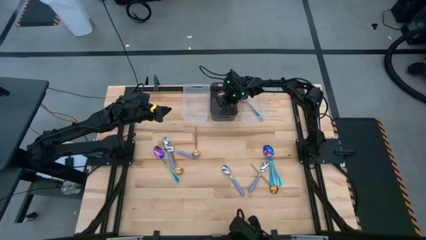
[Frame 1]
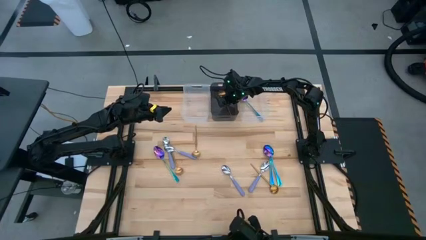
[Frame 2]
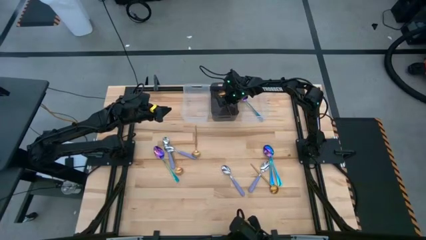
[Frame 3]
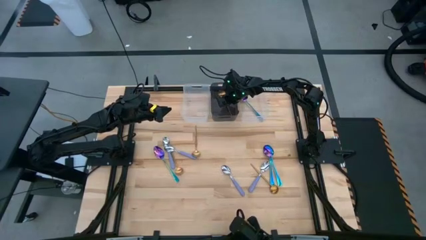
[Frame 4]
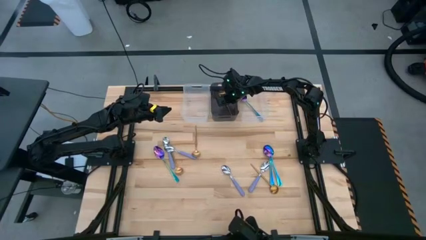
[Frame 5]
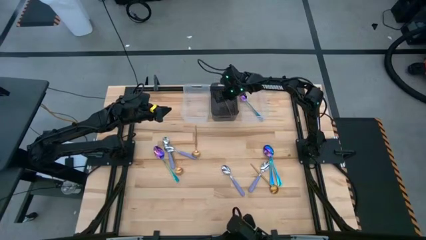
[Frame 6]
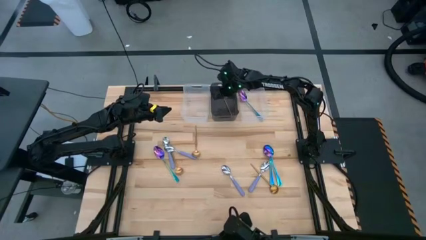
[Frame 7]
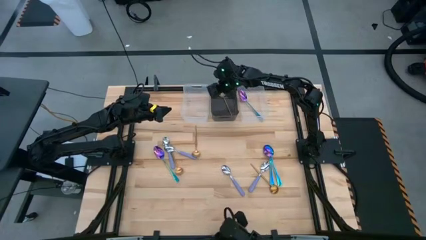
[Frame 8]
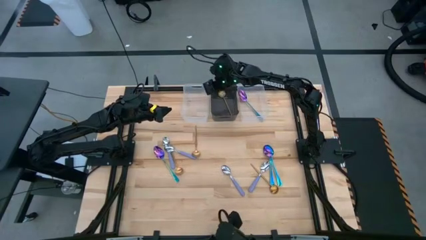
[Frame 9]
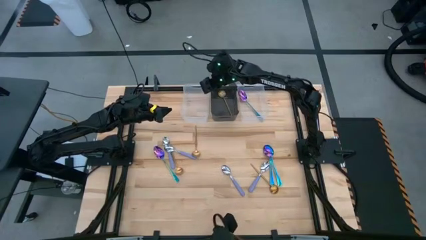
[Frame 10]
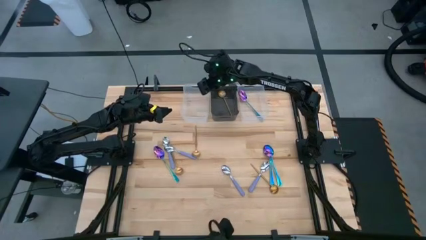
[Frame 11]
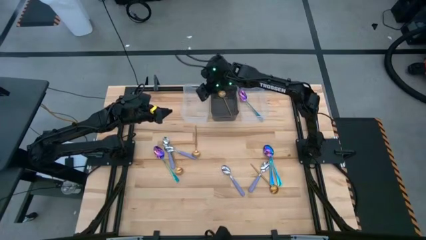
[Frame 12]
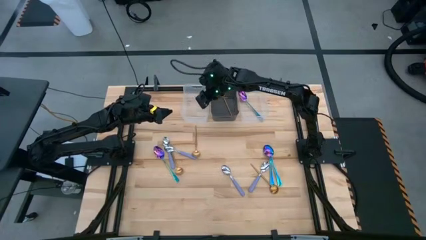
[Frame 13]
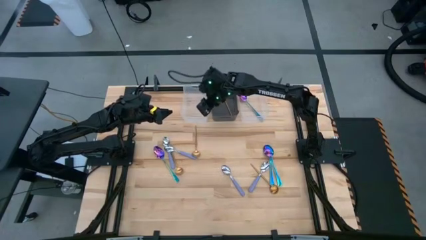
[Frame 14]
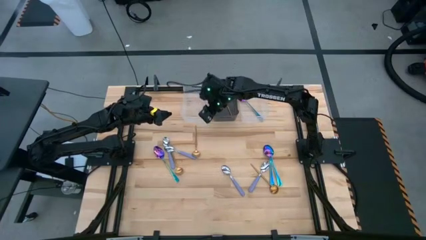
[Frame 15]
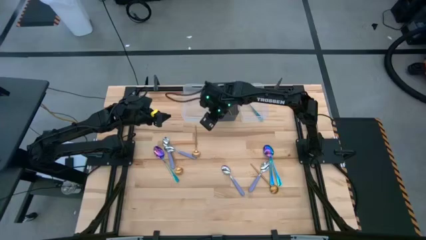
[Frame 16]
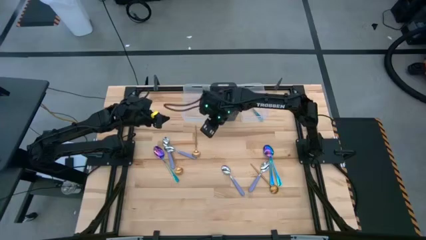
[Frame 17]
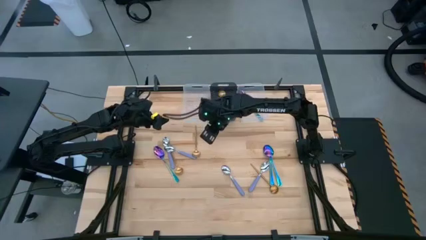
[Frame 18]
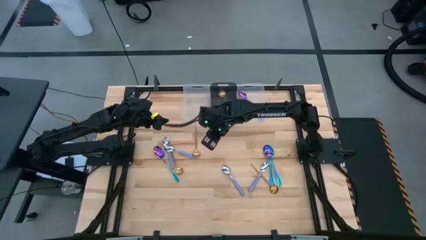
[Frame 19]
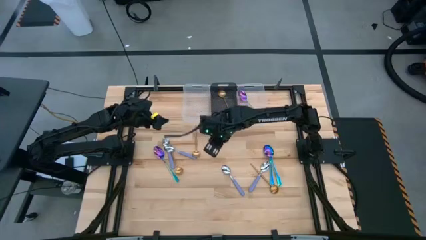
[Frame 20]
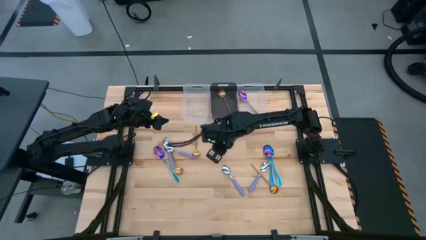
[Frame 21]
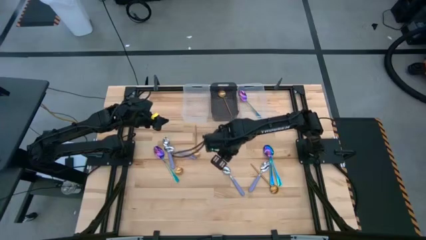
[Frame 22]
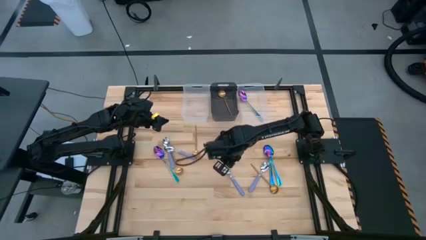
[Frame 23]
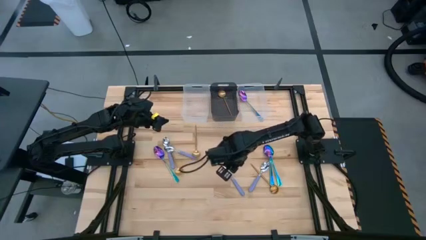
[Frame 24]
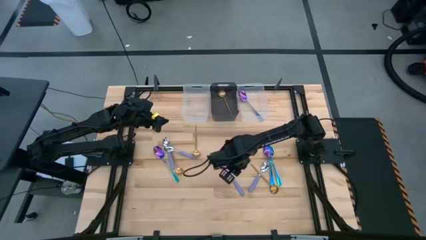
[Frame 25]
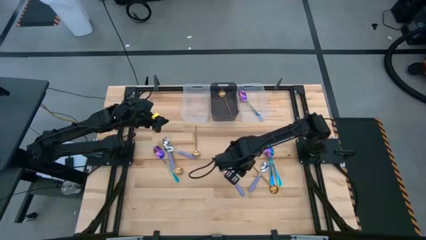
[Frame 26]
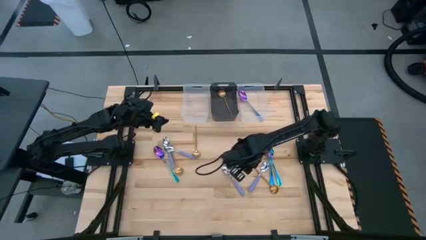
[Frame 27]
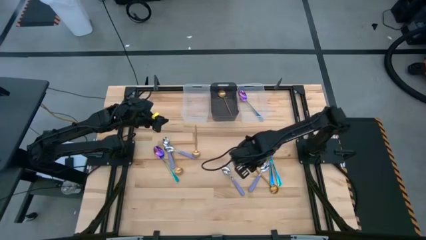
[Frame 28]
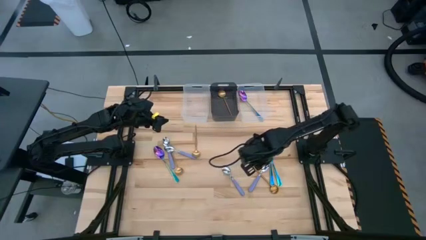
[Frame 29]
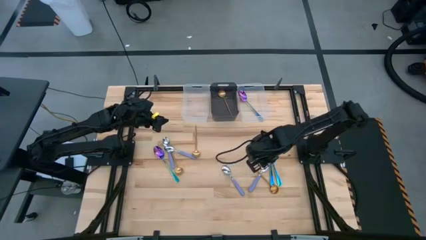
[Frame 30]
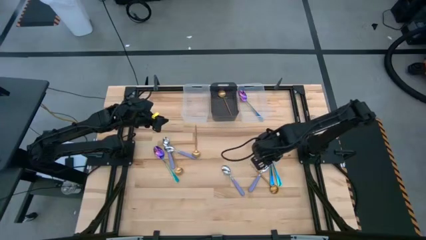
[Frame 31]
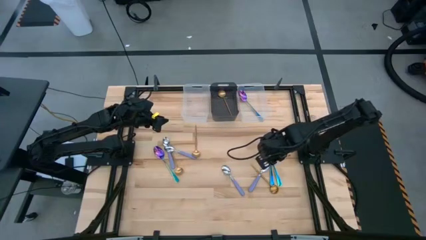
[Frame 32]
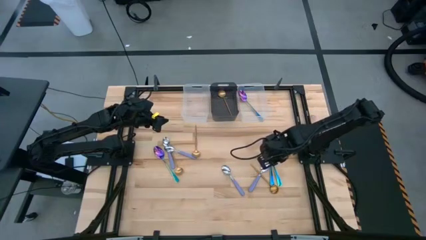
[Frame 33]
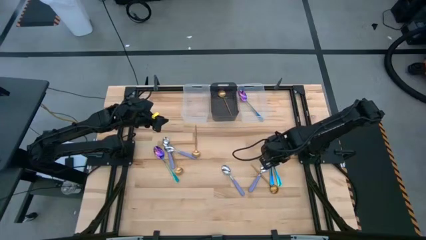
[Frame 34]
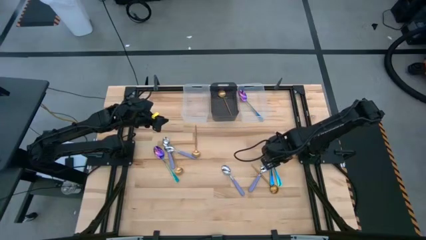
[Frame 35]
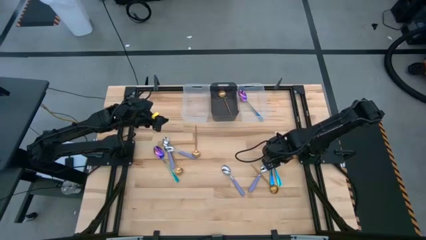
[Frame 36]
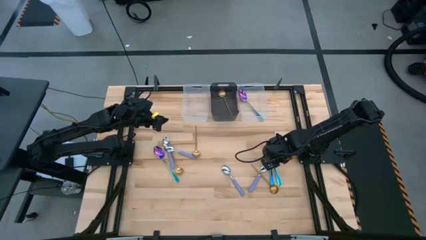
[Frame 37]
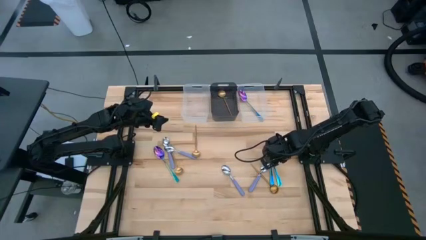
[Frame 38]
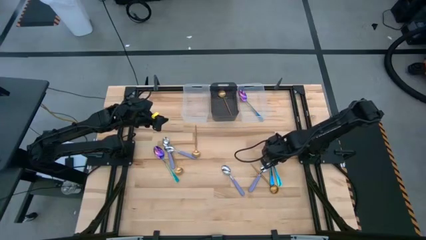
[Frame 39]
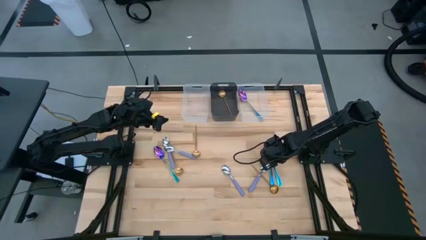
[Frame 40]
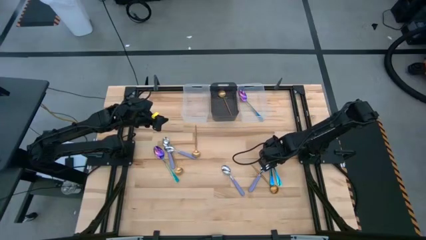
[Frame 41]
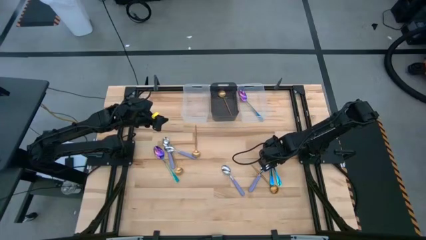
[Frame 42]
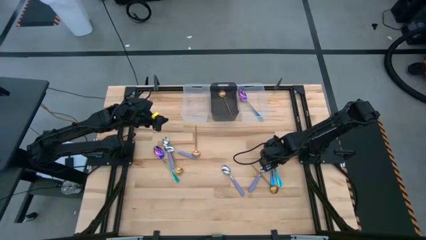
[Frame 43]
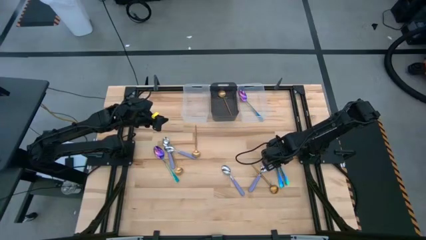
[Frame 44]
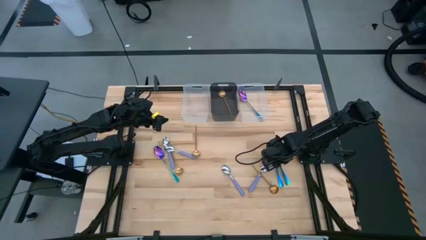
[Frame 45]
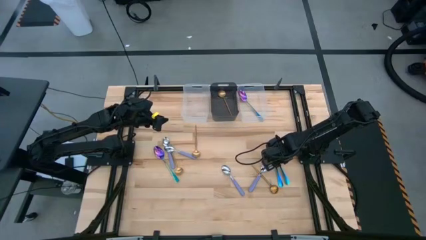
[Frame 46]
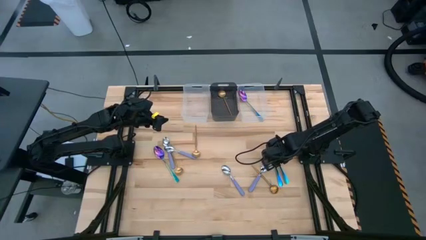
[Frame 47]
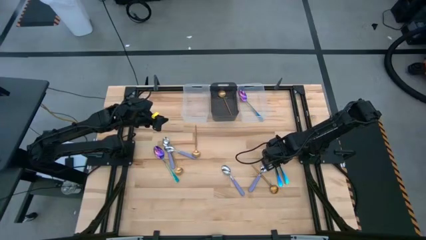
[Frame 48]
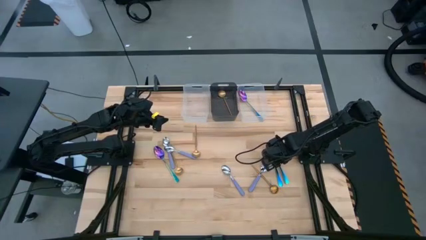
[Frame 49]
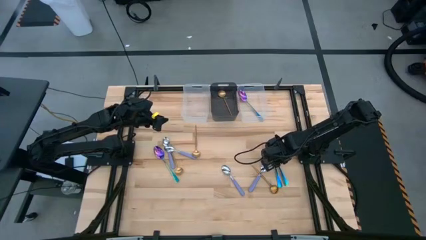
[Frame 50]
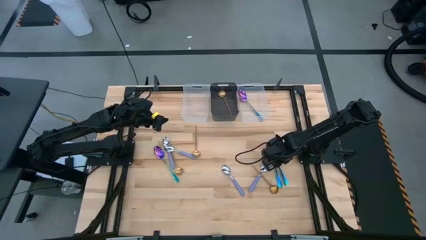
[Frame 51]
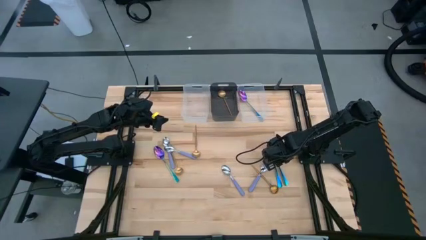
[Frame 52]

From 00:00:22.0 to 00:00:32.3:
Task: Sort silverware by color (type)
Put the blue spoon into the right transparent bin
